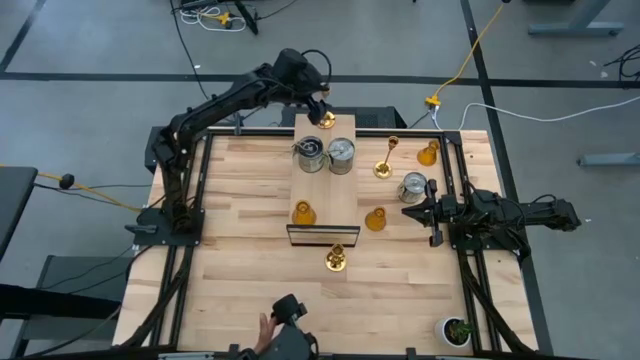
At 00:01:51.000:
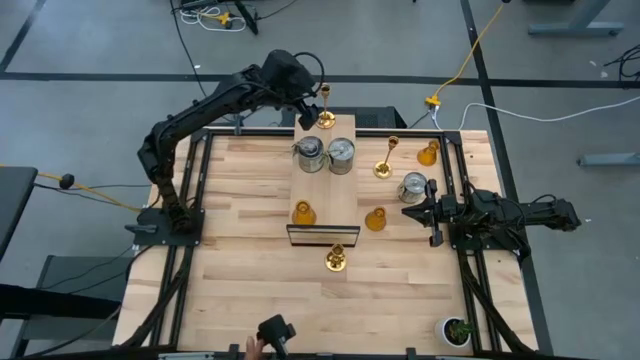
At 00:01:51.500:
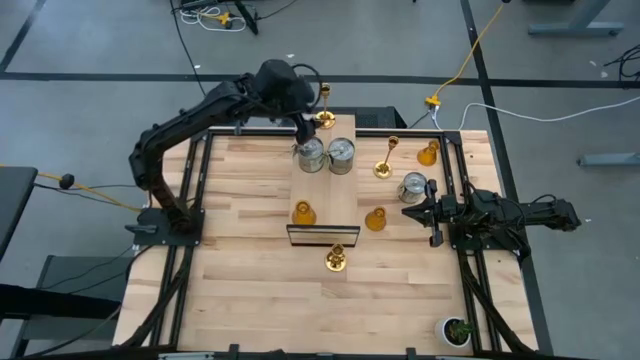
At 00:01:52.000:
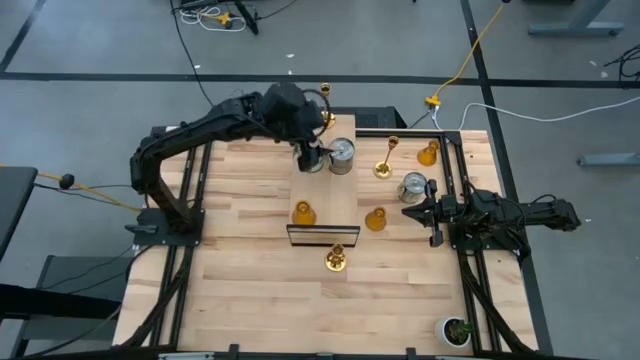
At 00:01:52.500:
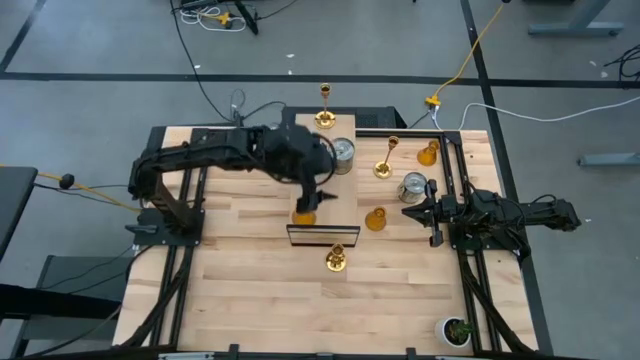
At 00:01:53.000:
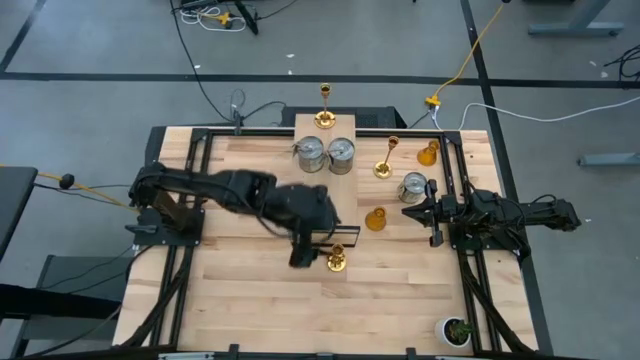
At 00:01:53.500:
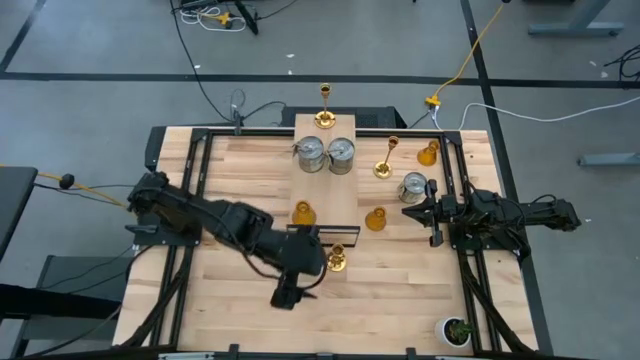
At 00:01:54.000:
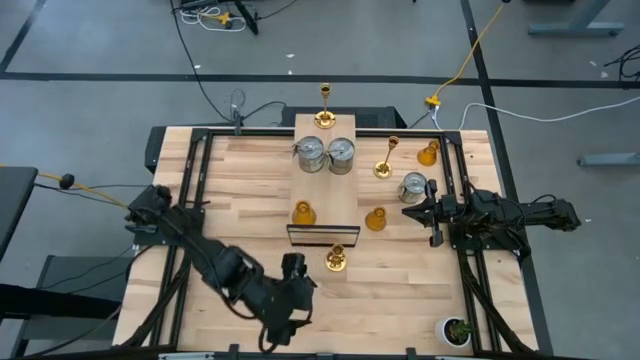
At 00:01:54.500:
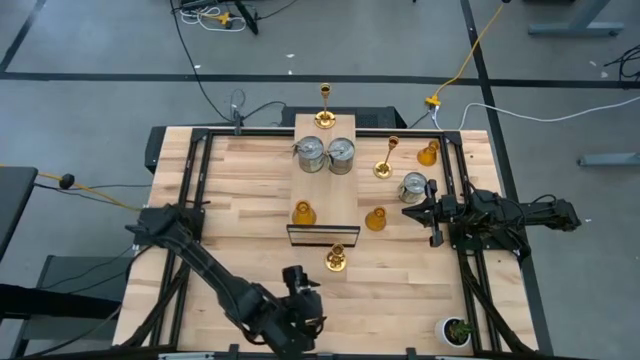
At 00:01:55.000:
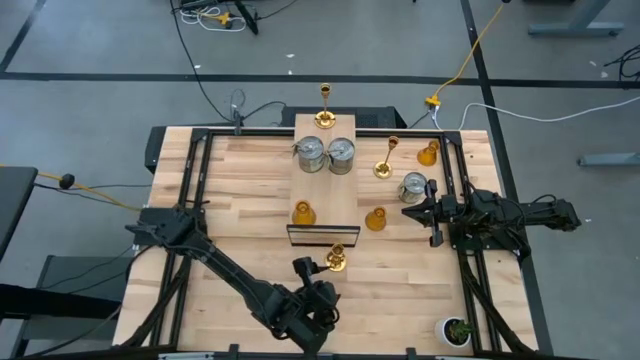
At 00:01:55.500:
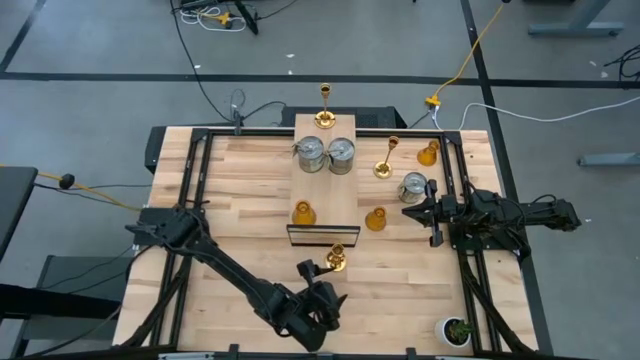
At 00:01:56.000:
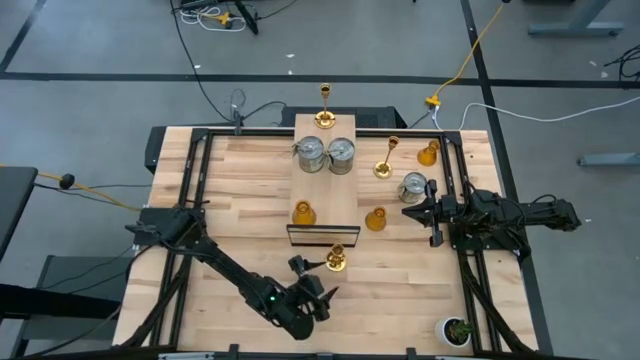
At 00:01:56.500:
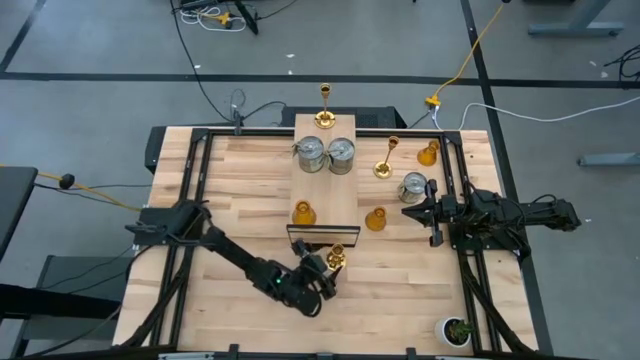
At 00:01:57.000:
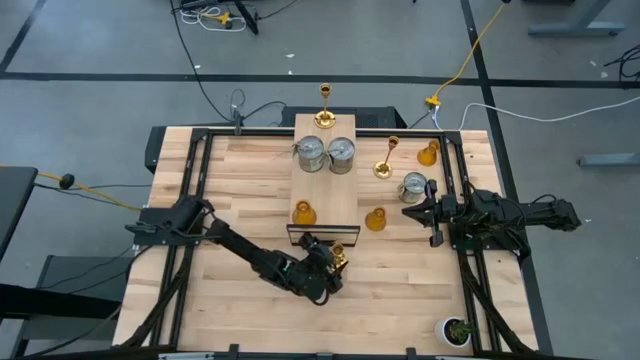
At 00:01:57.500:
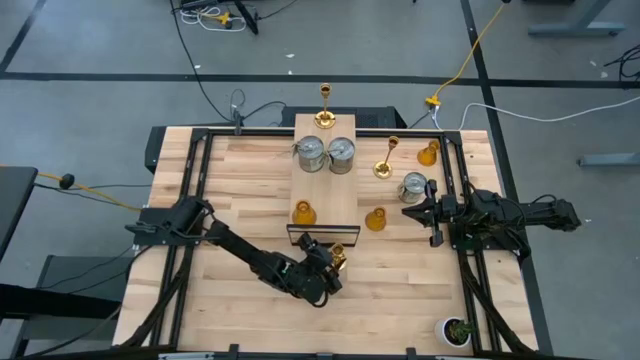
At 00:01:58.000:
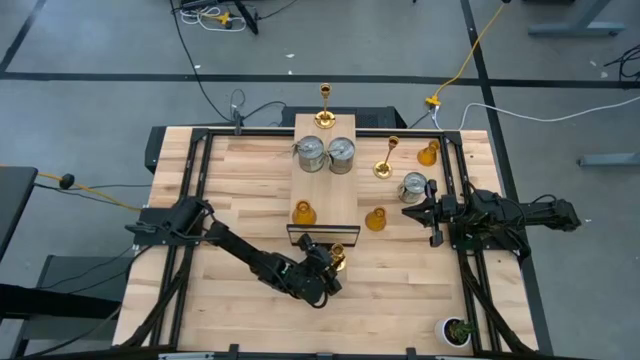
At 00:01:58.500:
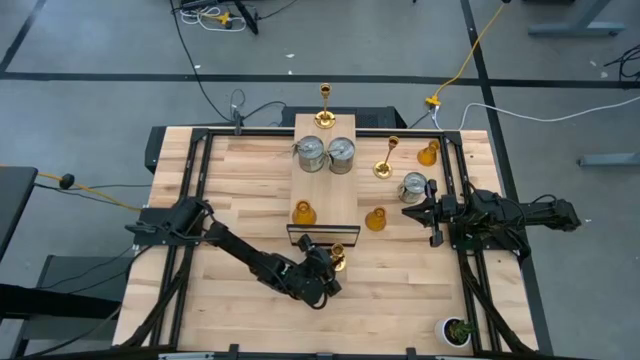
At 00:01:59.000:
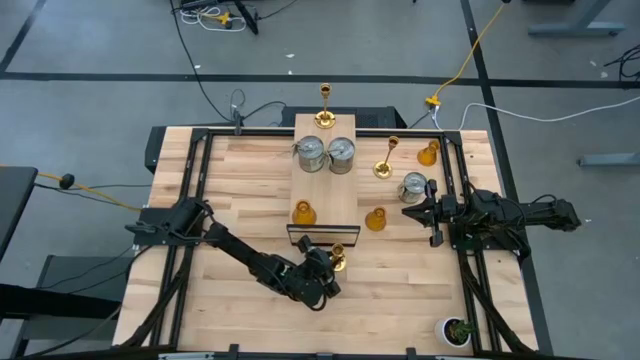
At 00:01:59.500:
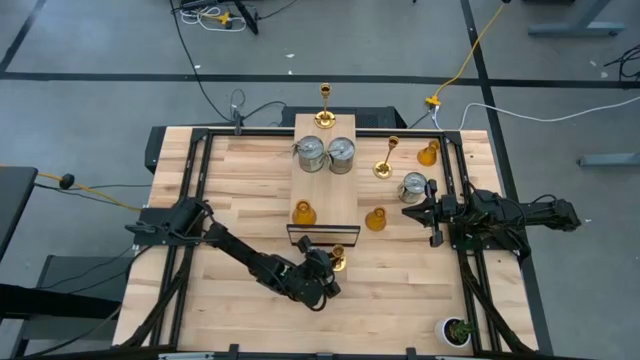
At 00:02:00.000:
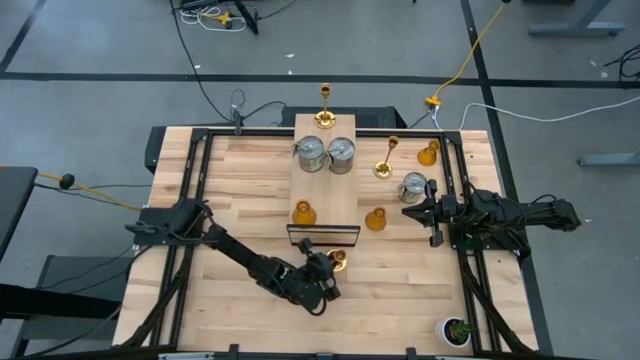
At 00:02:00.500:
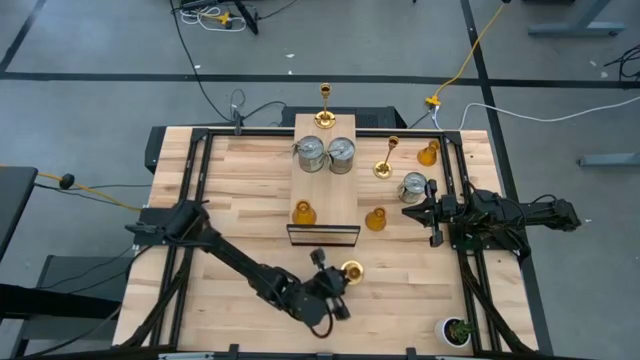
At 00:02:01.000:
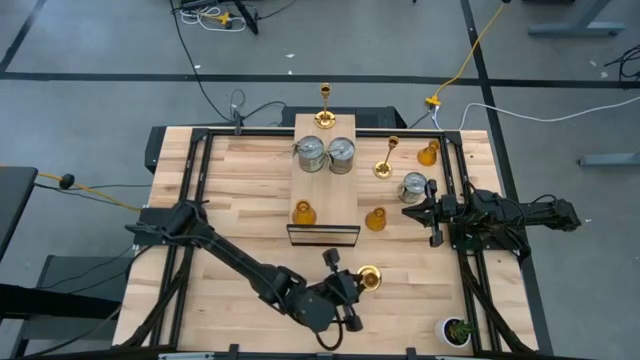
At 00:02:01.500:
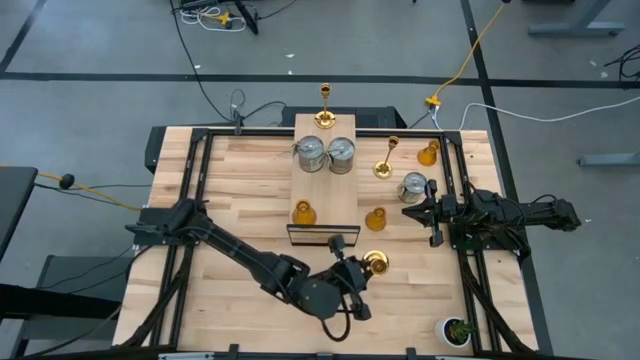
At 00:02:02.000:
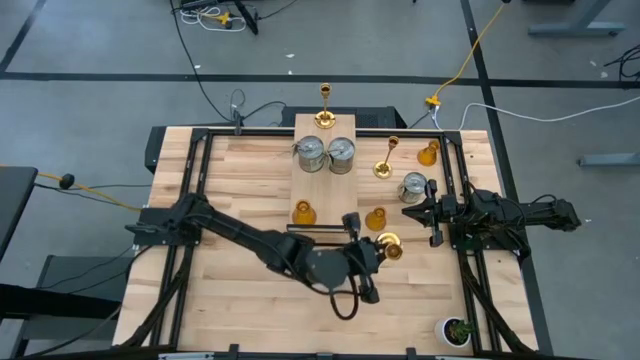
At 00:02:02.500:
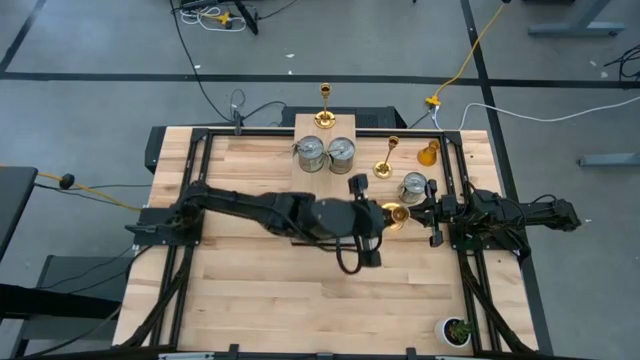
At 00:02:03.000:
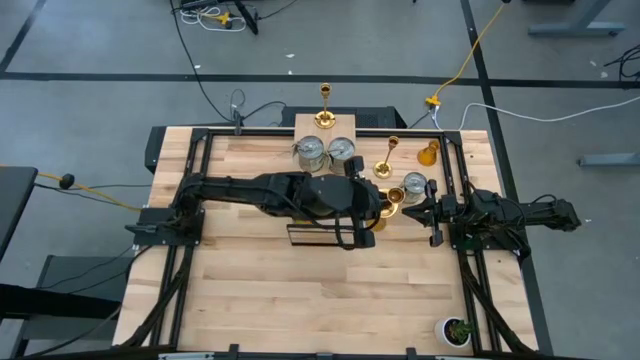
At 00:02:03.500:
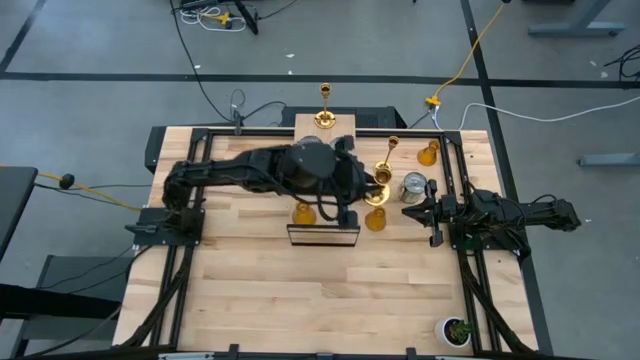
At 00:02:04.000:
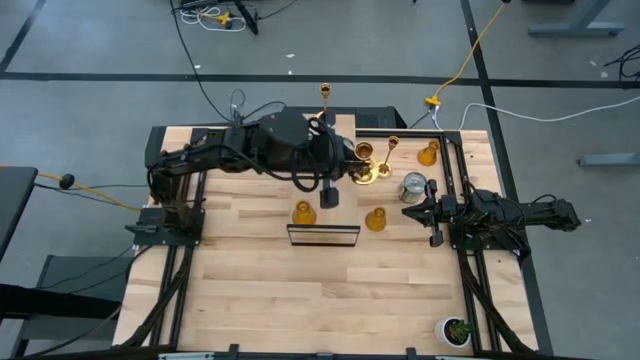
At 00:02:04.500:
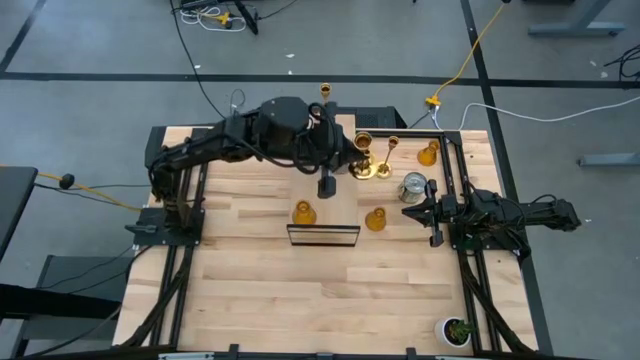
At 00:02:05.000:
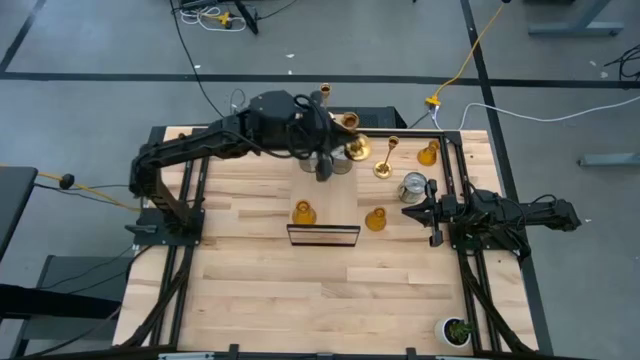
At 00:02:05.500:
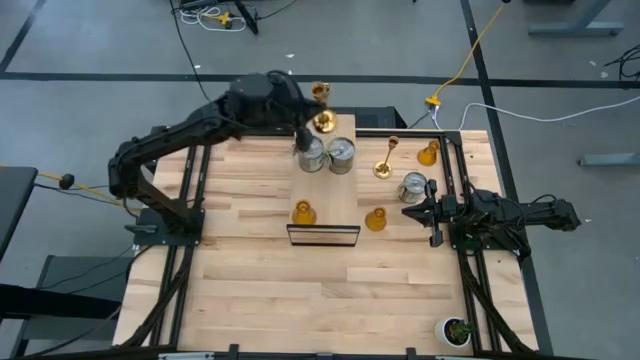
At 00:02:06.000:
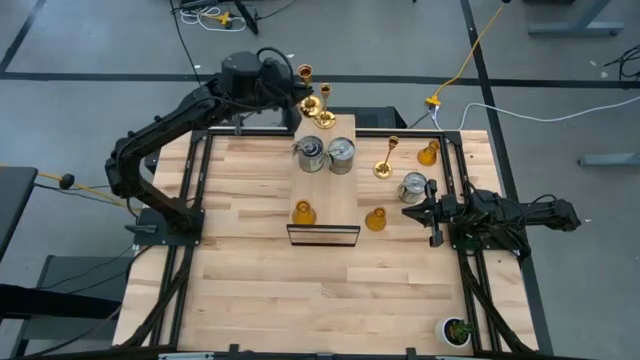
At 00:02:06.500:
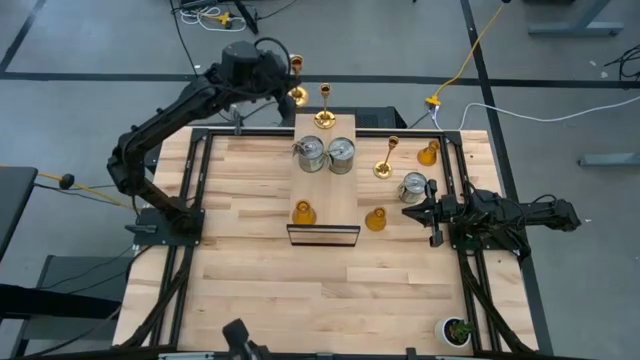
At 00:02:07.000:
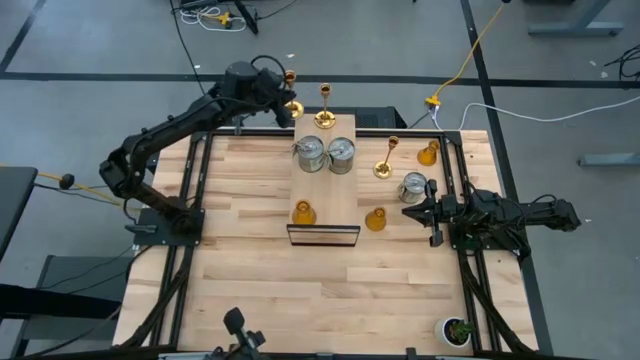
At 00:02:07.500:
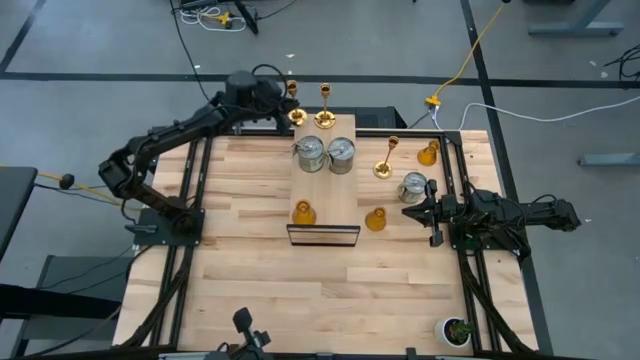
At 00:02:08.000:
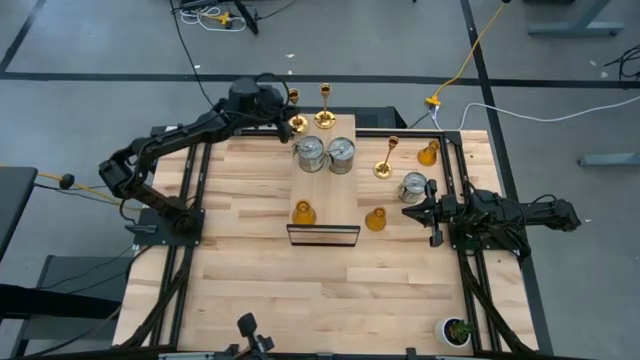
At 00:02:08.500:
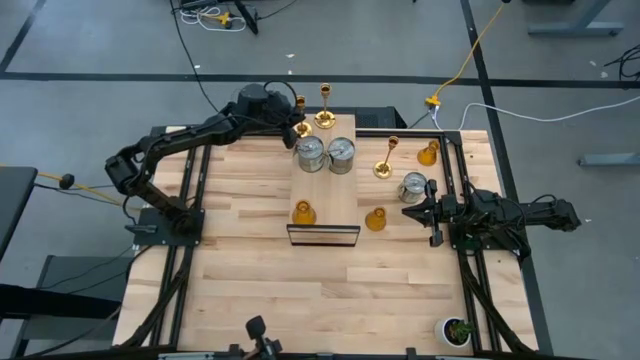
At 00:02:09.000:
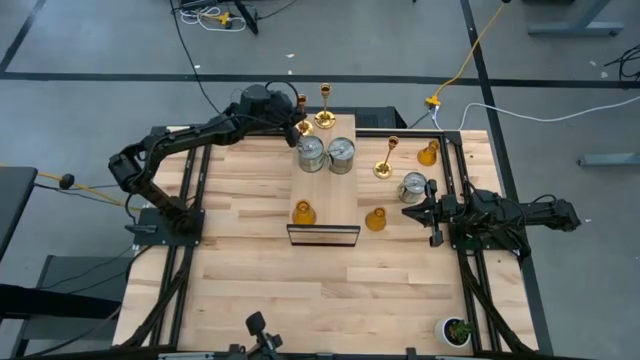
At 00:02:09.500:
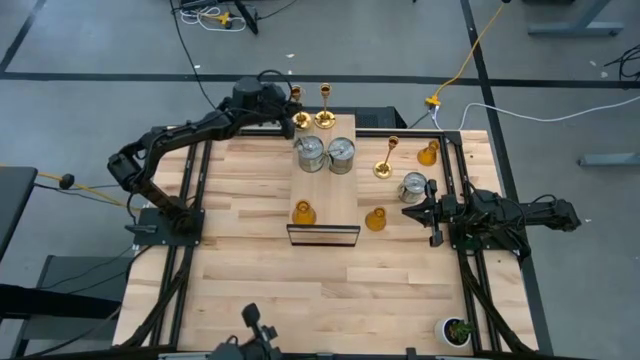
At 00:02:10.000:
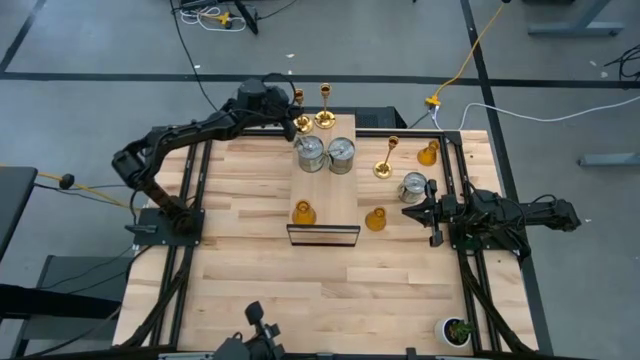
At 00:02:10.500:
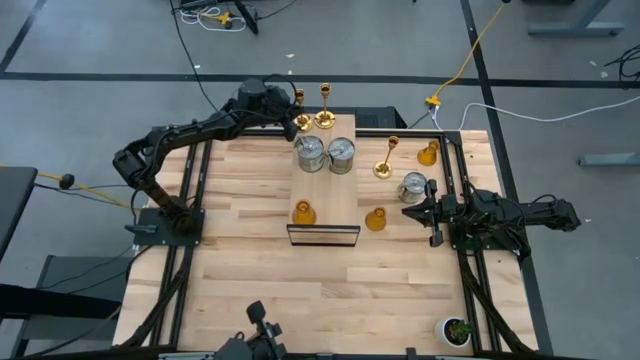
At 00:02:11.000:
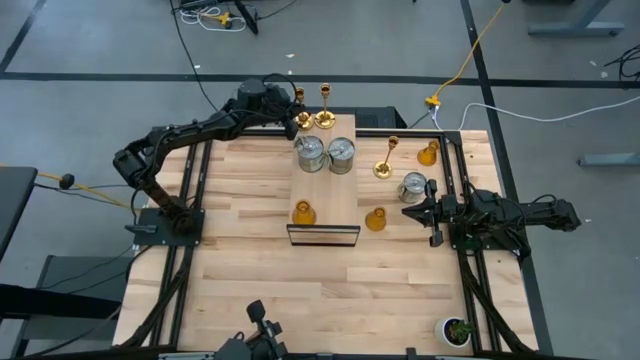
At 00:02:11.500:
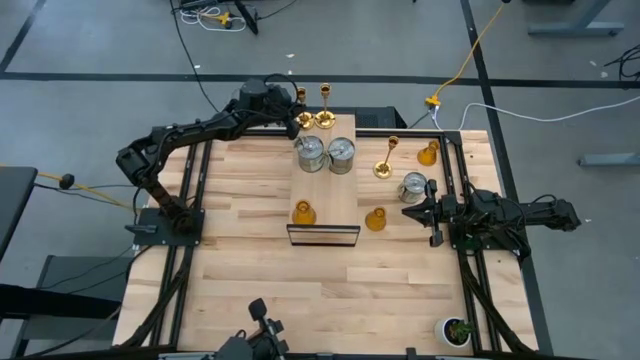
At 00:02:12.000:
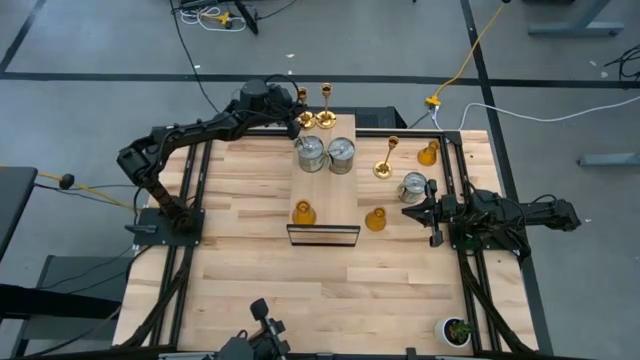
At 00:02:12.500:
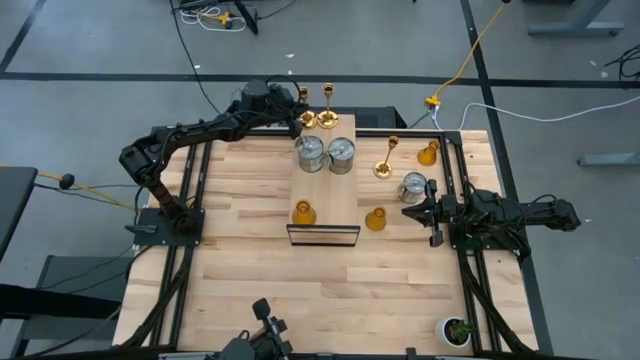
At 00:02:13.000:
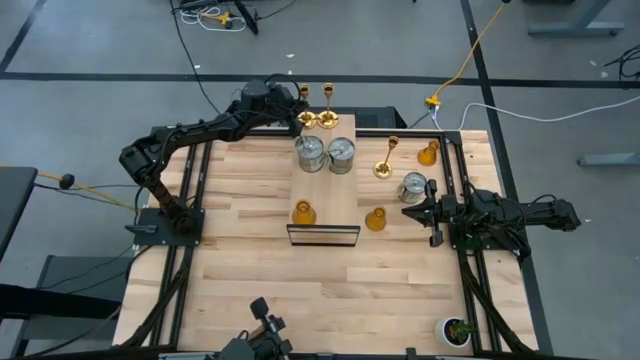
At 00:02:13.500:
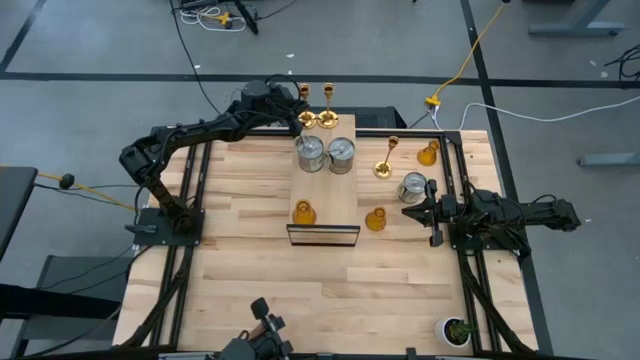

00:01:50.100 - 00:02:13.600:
Task: Pick & Place candle stick holders
Put the bottom gold candle holder aligned with the other candle holder on the shelf
